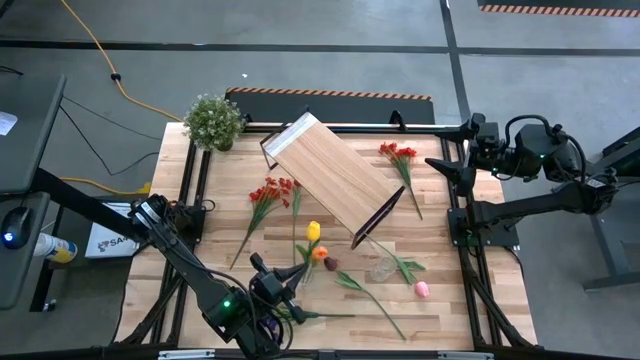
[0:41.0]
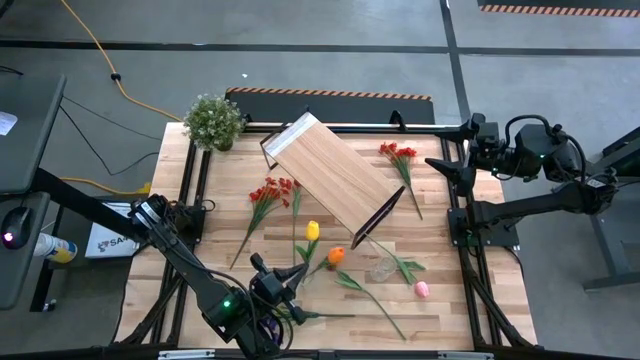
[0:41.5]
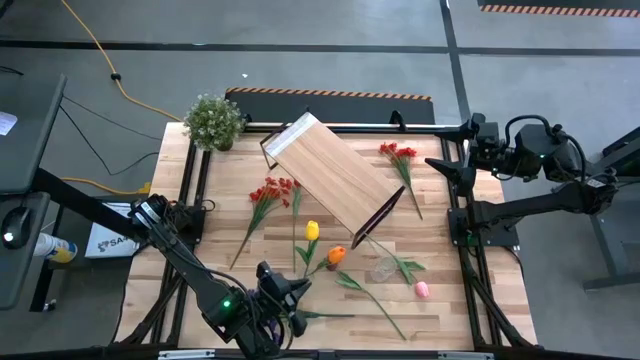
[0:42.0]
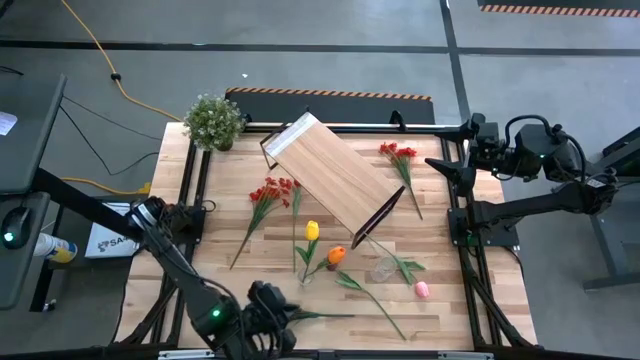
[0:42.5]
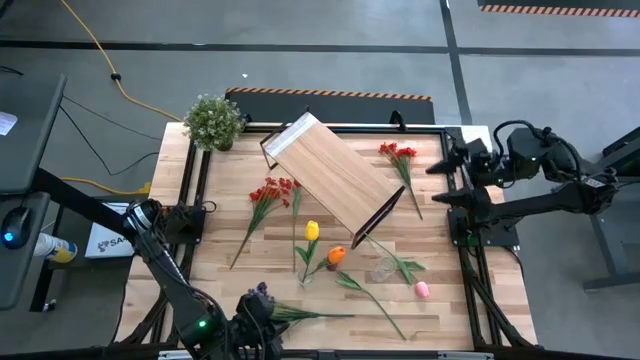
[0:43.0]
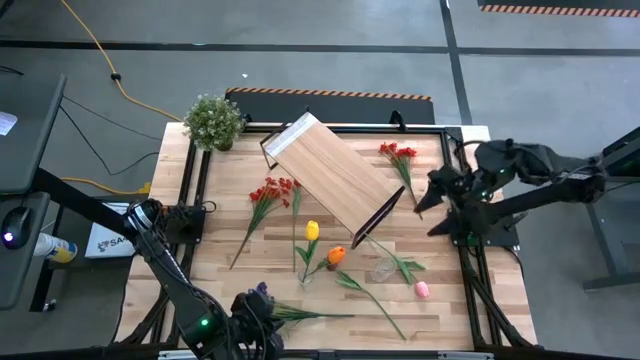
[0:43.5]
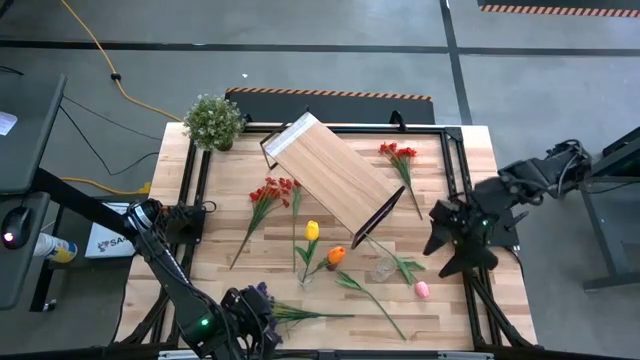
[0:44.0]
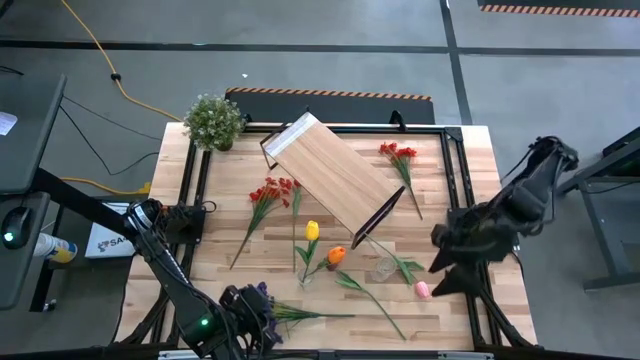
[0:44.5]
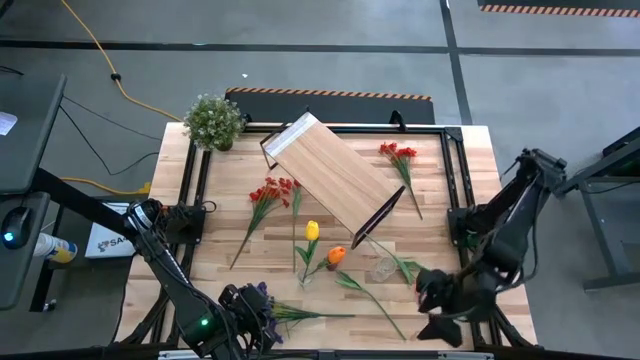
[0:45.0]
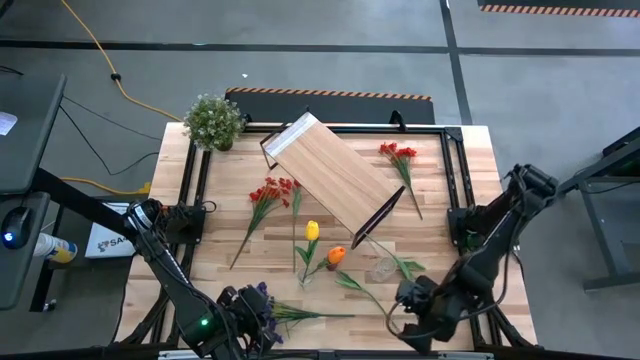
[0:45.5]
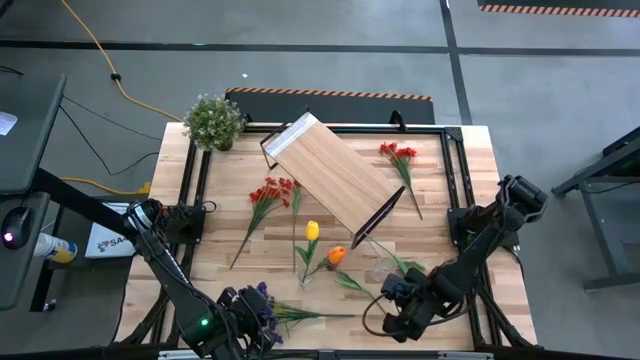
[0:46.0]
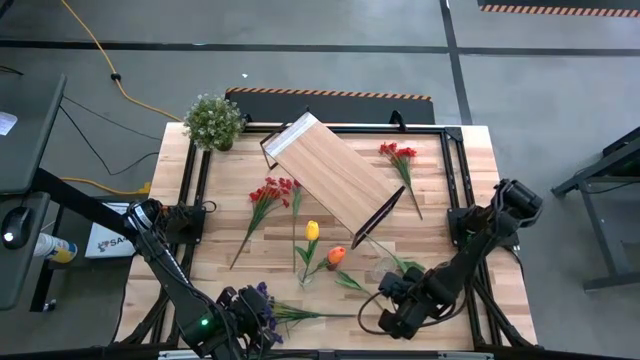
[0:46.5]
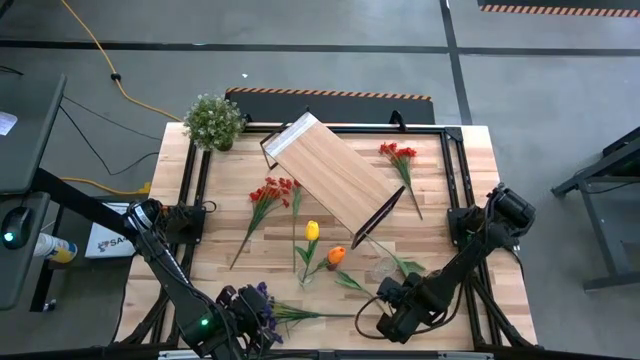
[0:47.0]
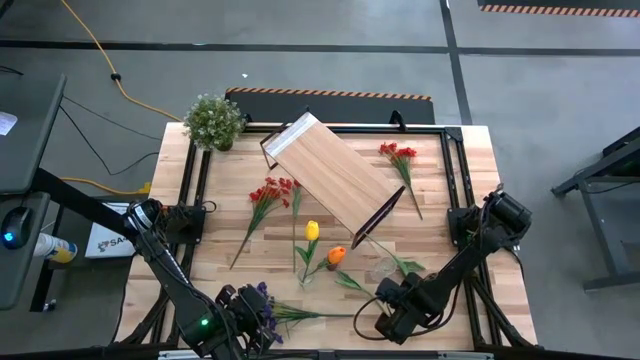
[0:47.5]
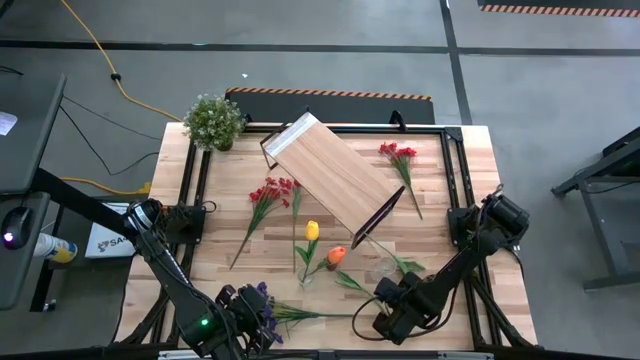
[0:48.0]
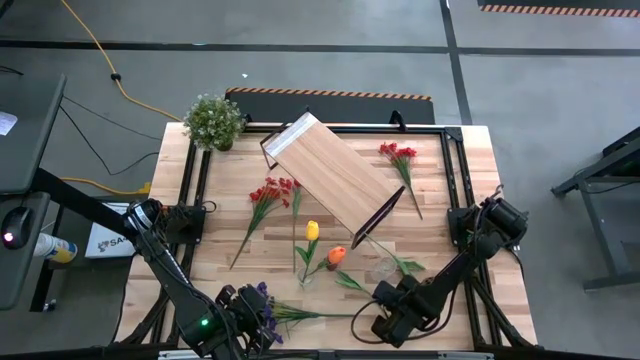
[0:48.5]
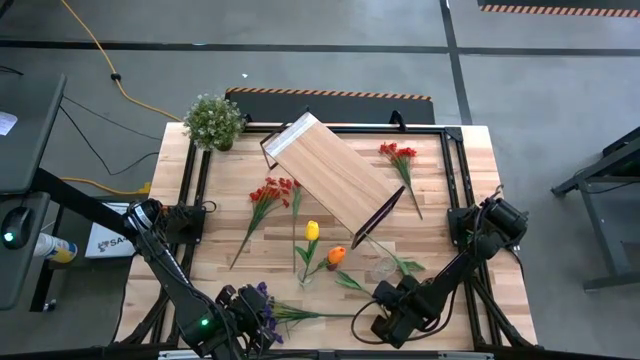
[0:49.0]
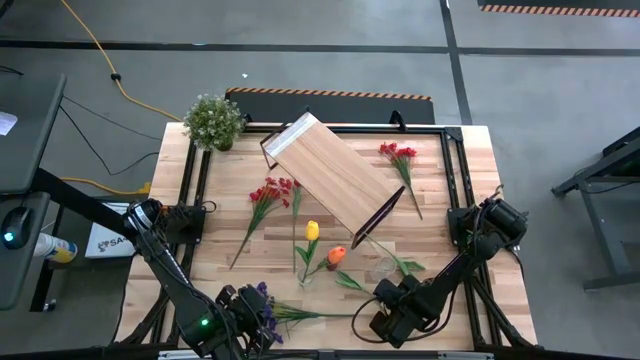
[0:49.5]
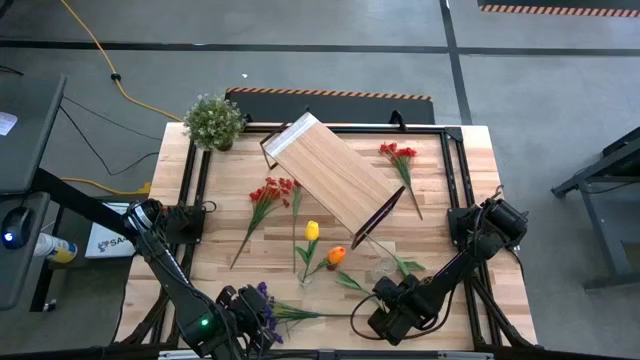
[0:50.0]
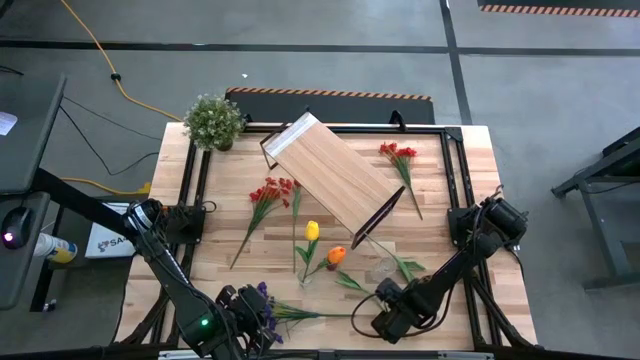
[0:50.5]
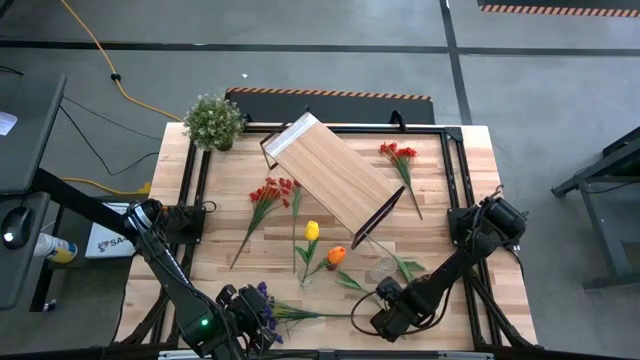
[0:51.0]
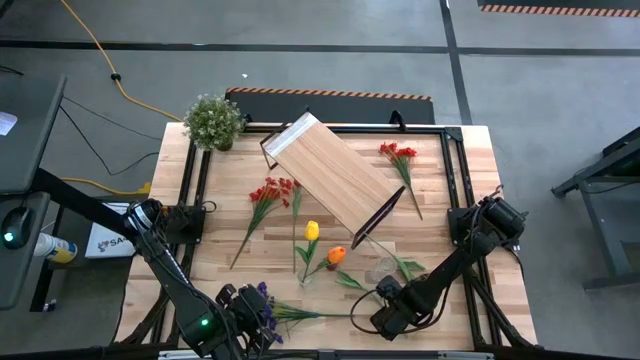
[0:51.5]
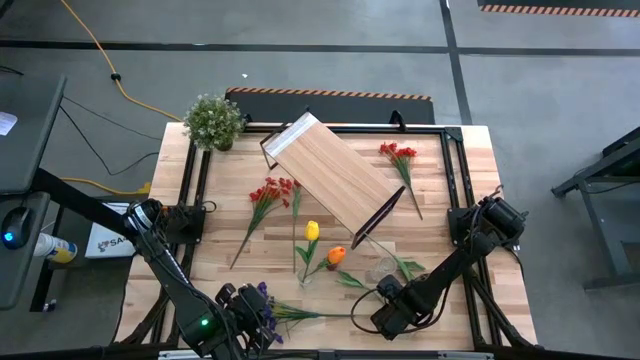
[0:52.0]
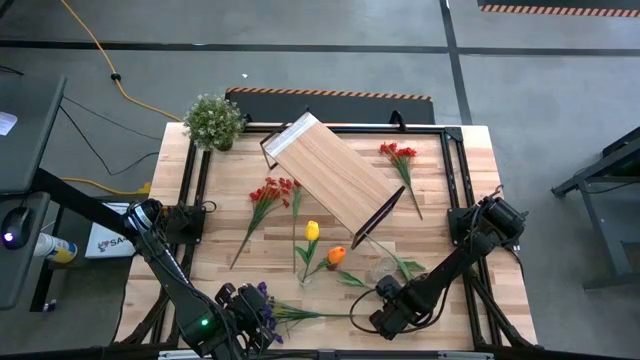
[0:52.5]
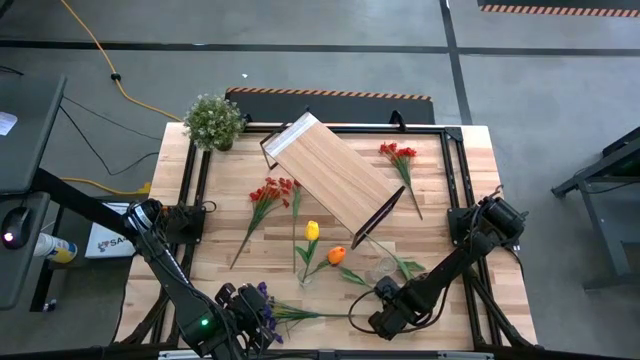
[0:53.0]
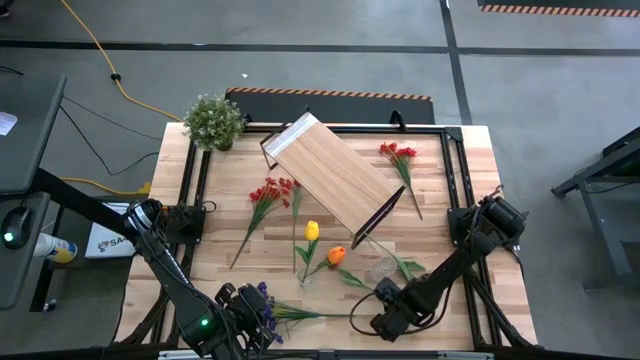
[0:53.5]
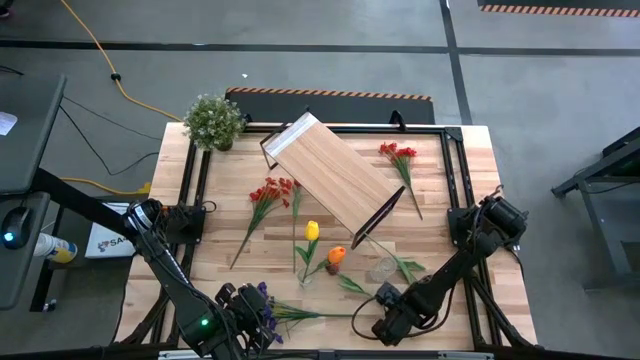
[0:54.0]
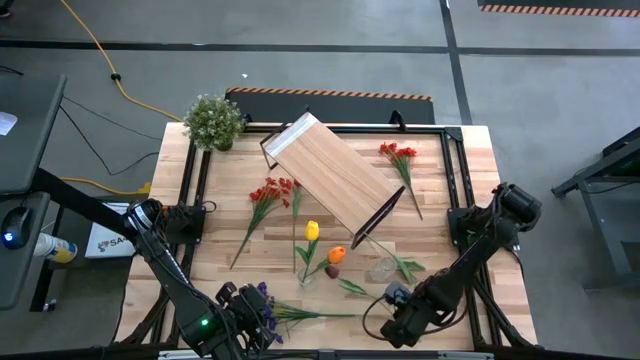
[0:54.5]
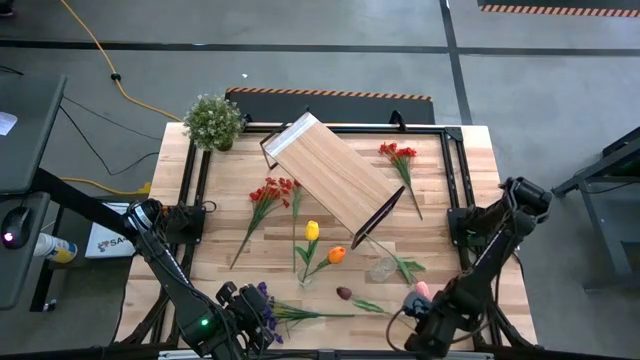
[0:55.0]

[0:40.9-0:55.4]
Task: Pick and place flowers into a vace then onto a shelf
Put the dark red tulip into the left transparent vase

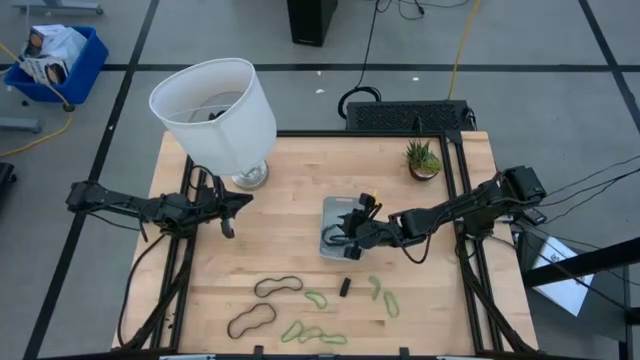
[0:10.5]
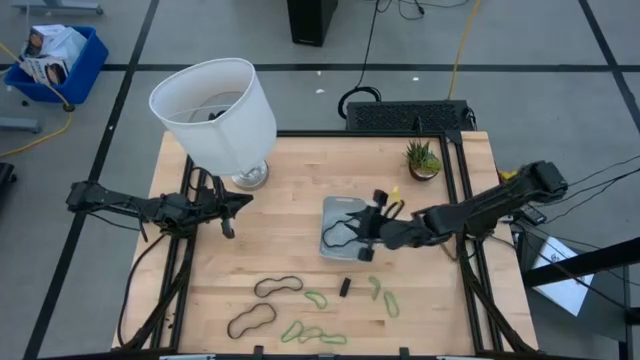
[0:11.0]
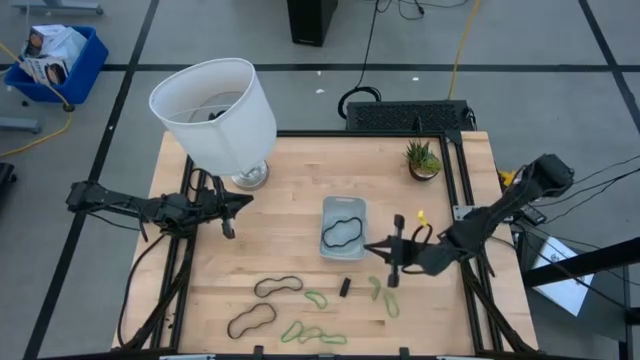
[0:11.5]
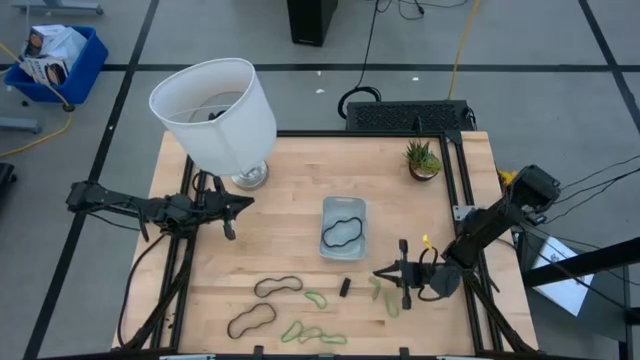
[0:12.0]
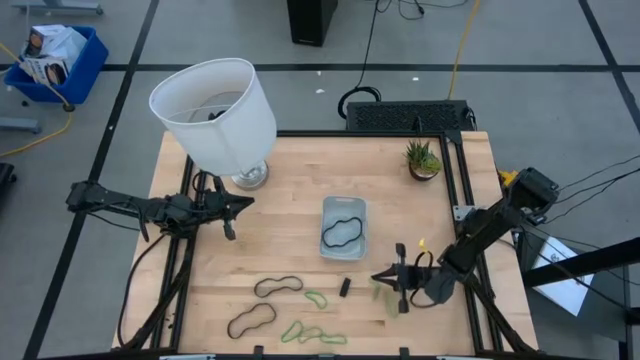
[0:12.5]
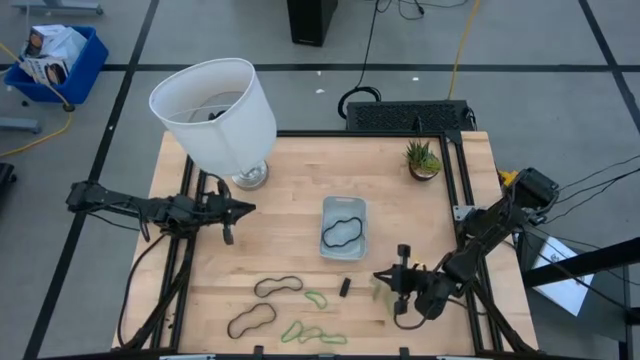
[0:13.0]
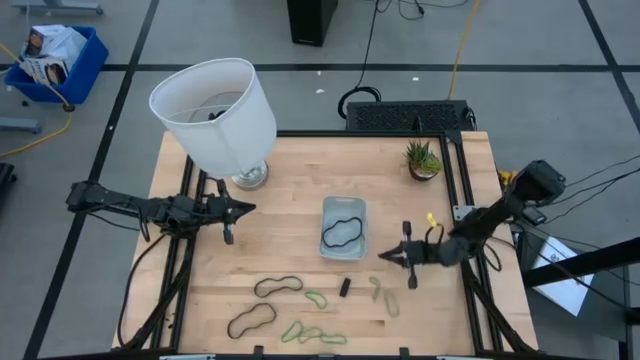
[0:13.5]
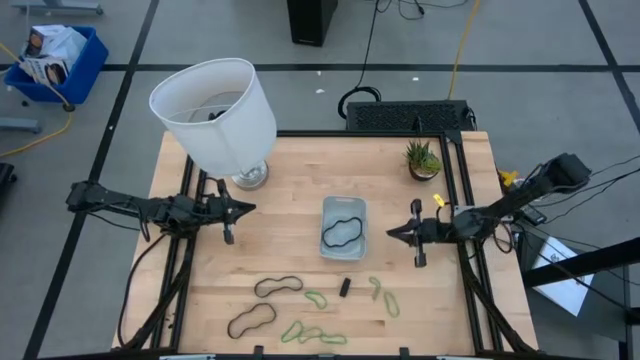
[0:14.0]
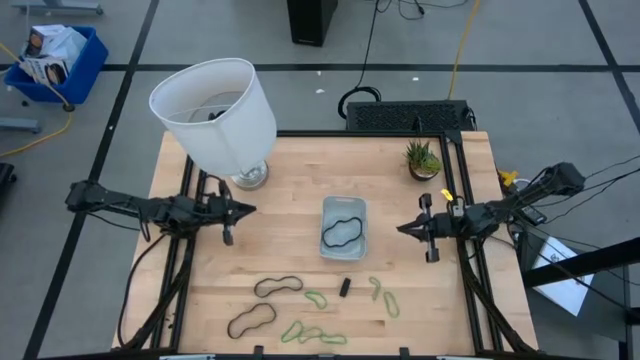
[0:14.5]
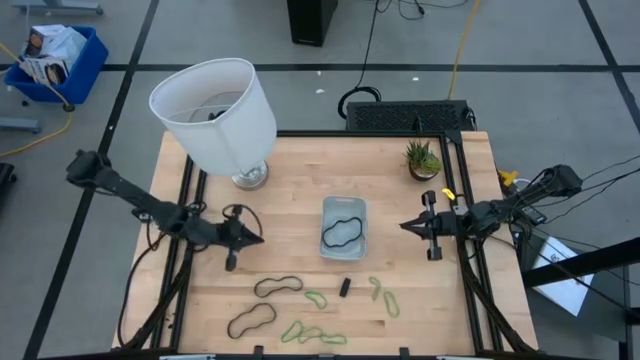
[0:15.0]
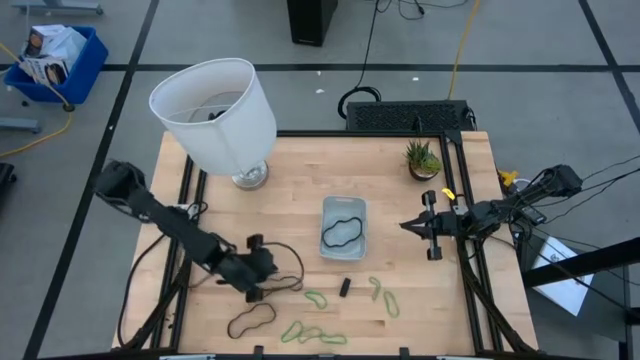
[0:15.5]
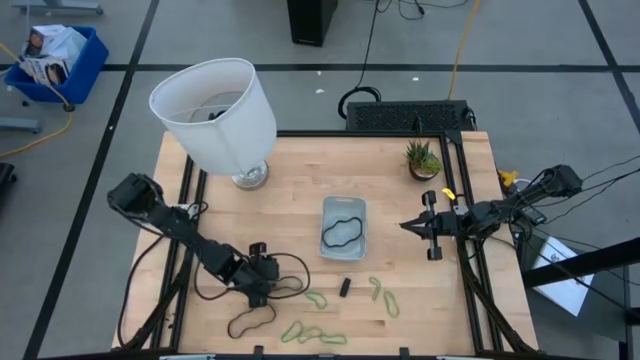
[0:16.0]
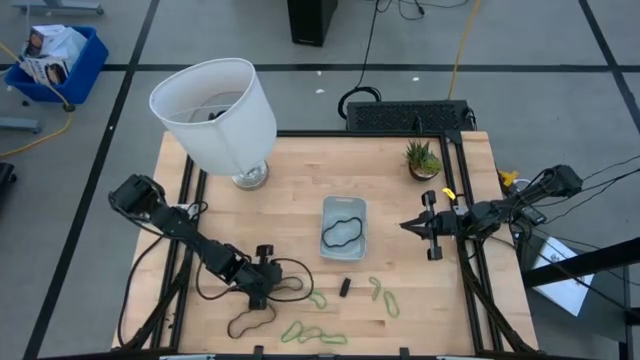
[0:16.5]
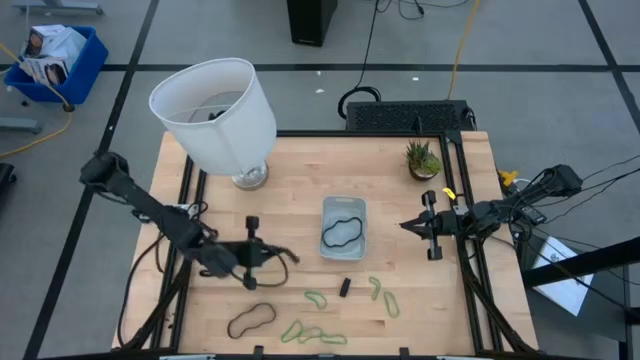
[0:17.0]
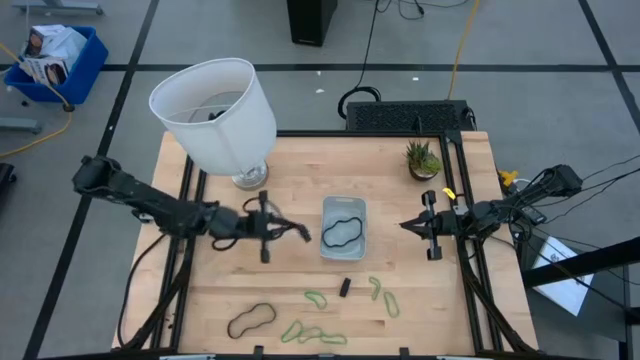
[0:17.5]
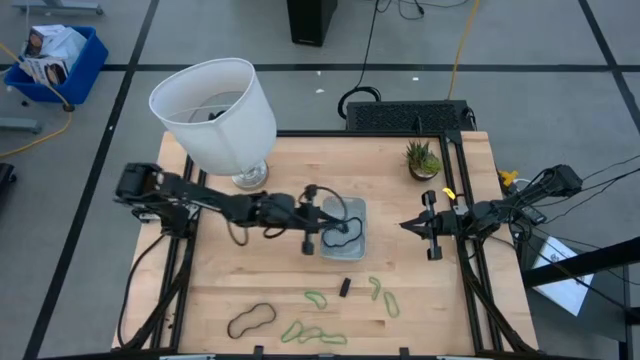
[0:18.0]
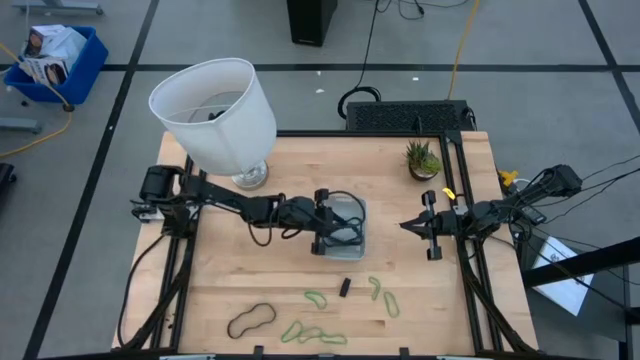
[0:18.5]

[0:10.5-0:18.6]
Task: Pick and place rubber bands into bin
Put the black rubber band into the gray container
